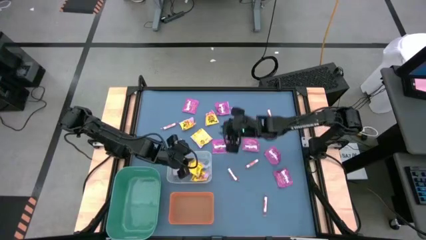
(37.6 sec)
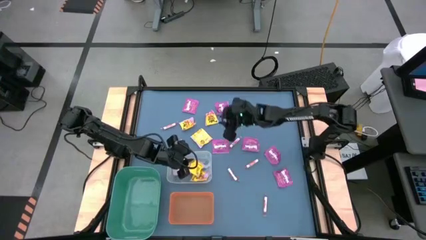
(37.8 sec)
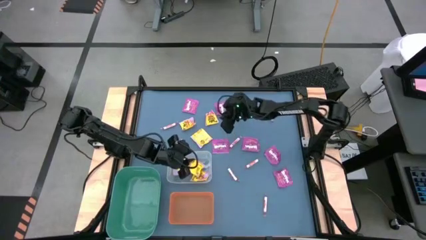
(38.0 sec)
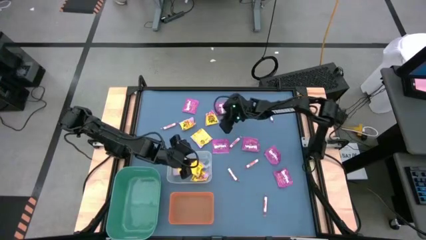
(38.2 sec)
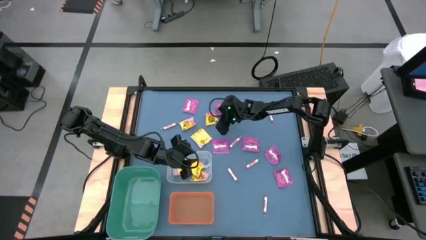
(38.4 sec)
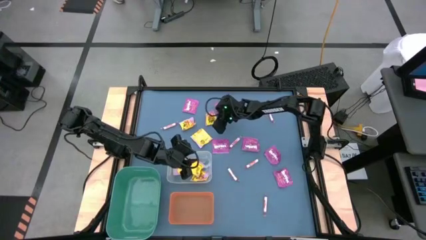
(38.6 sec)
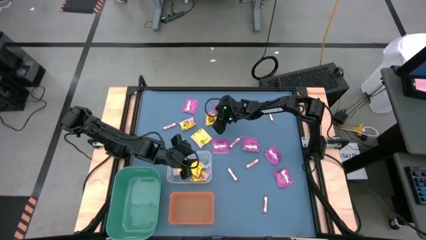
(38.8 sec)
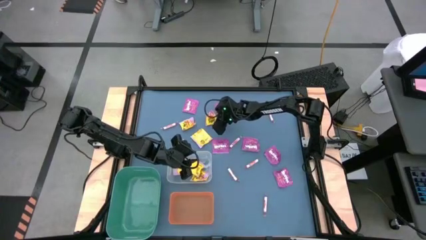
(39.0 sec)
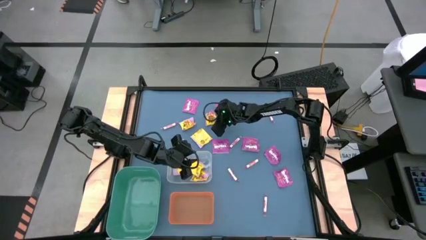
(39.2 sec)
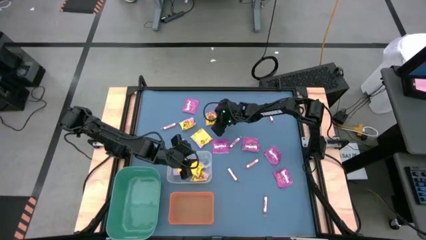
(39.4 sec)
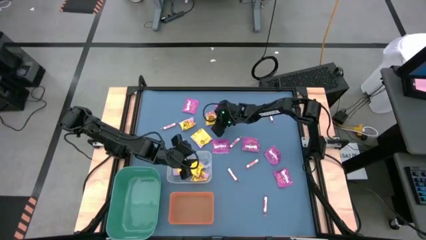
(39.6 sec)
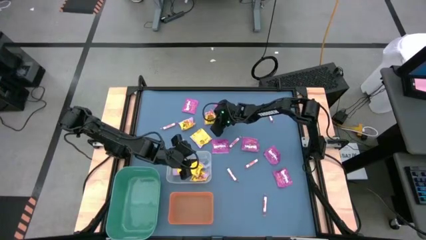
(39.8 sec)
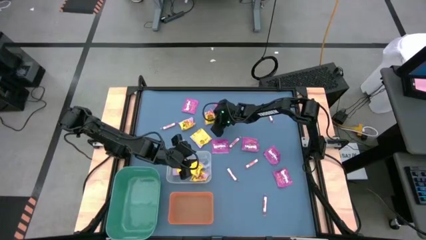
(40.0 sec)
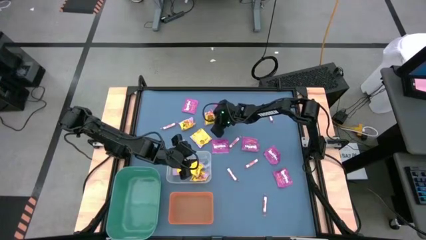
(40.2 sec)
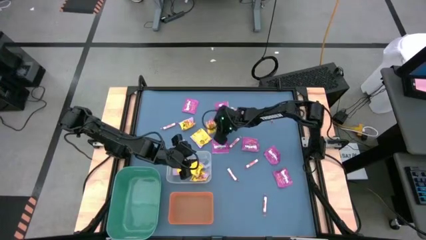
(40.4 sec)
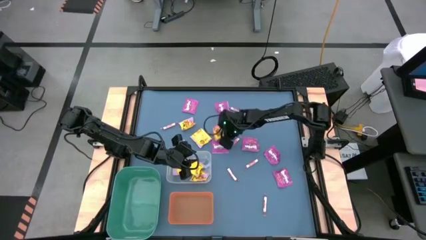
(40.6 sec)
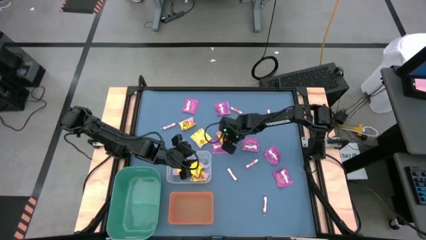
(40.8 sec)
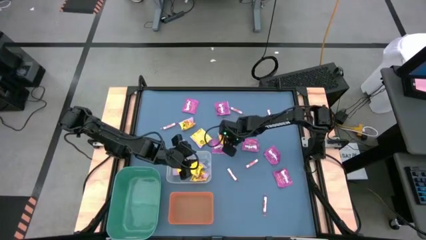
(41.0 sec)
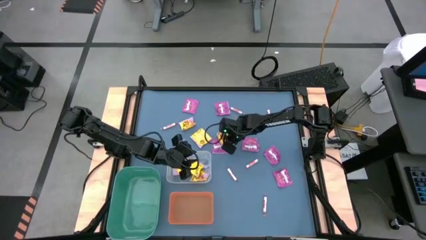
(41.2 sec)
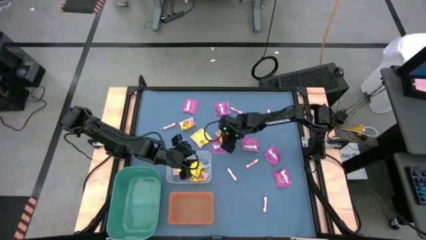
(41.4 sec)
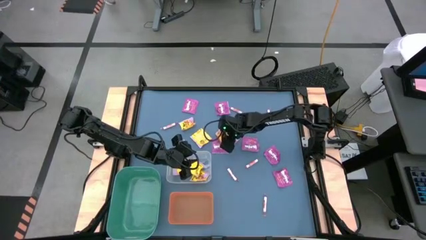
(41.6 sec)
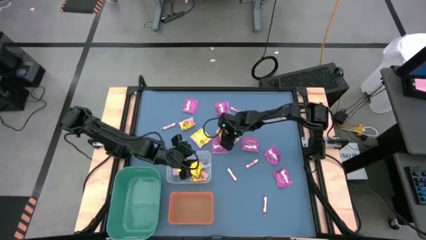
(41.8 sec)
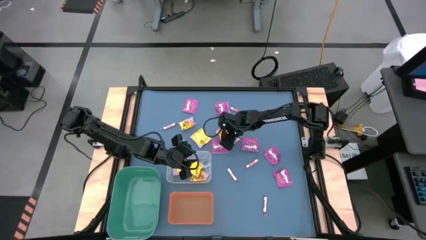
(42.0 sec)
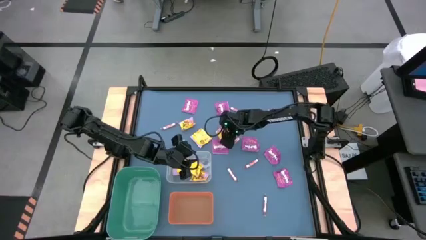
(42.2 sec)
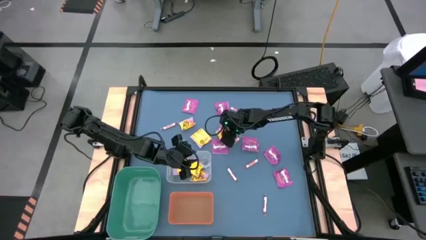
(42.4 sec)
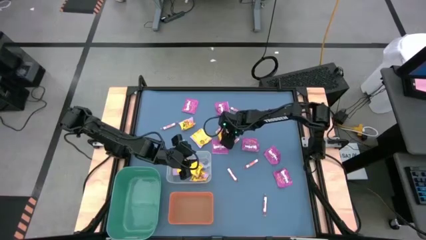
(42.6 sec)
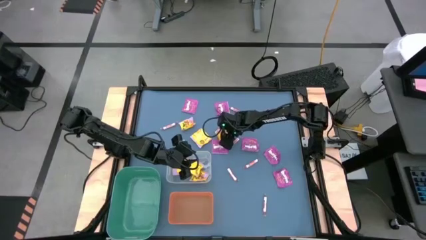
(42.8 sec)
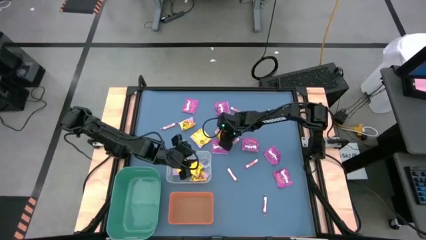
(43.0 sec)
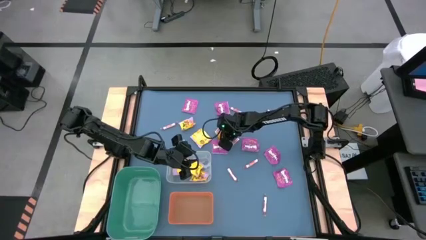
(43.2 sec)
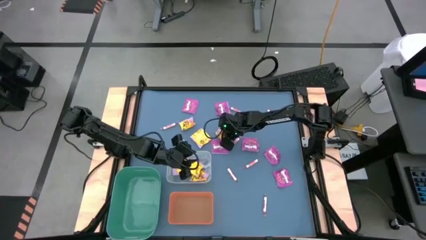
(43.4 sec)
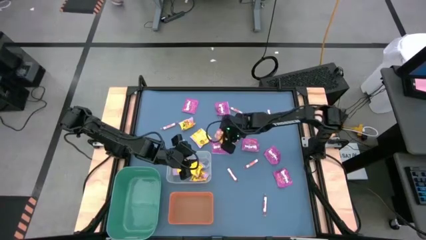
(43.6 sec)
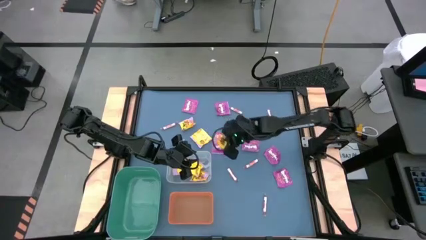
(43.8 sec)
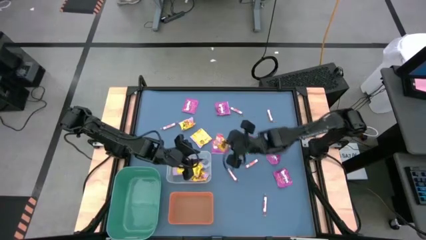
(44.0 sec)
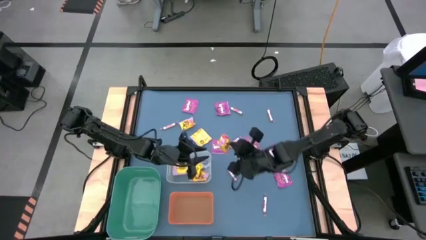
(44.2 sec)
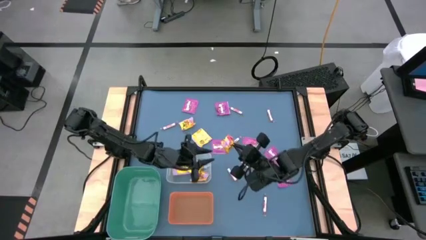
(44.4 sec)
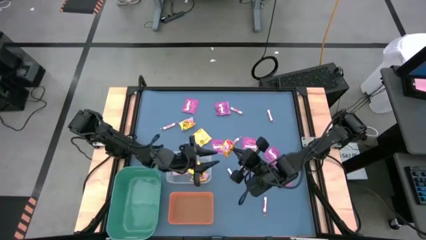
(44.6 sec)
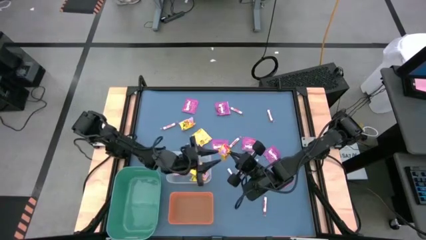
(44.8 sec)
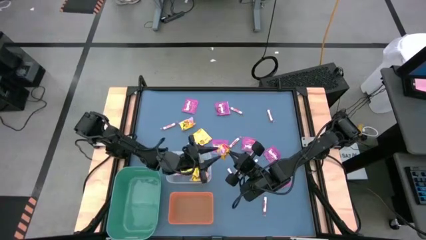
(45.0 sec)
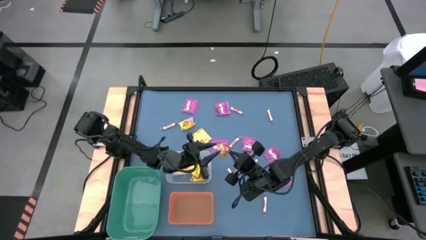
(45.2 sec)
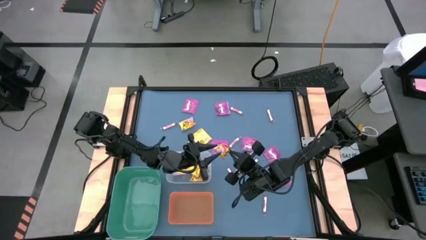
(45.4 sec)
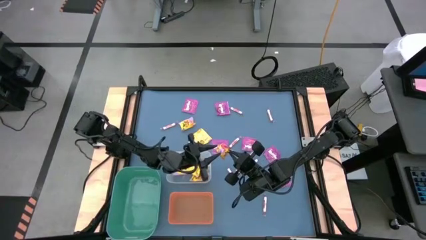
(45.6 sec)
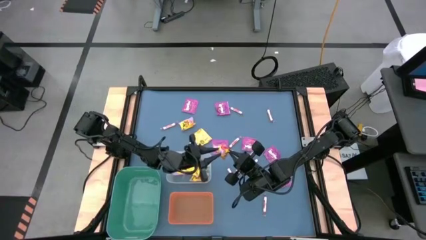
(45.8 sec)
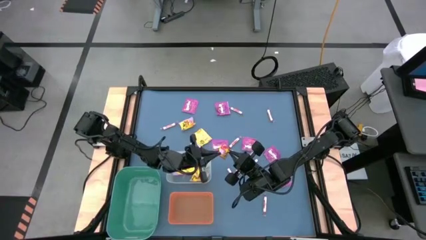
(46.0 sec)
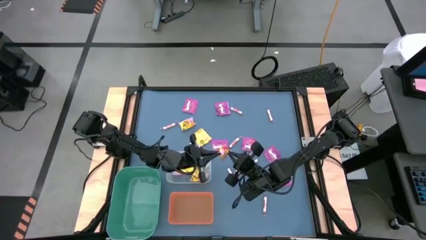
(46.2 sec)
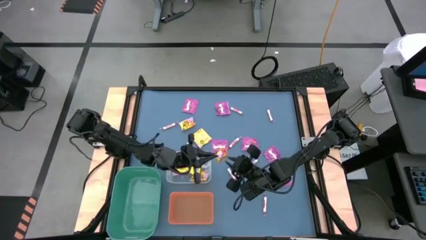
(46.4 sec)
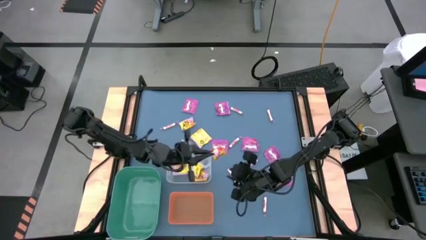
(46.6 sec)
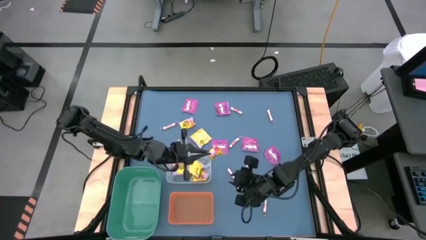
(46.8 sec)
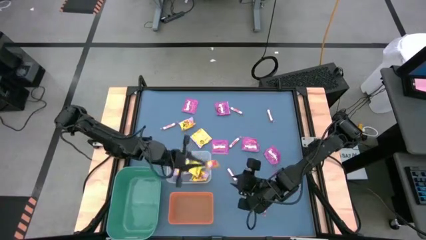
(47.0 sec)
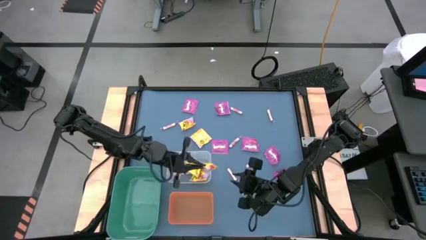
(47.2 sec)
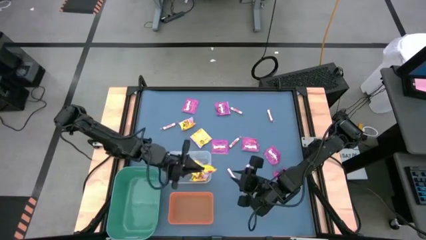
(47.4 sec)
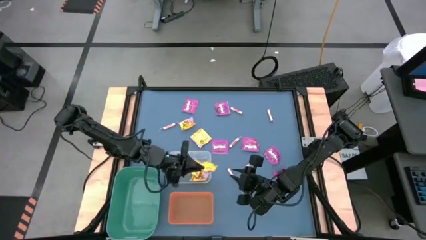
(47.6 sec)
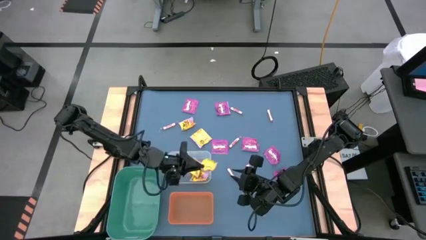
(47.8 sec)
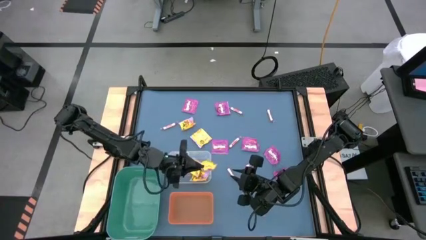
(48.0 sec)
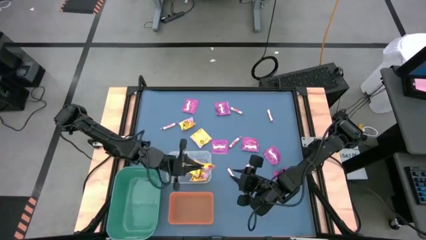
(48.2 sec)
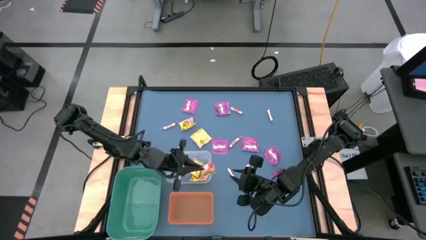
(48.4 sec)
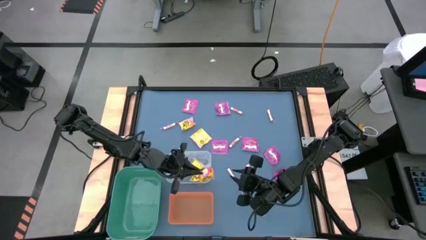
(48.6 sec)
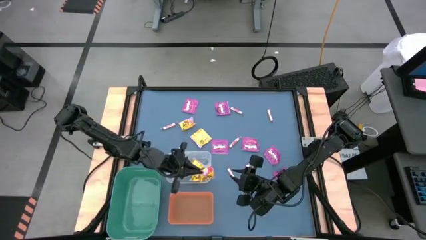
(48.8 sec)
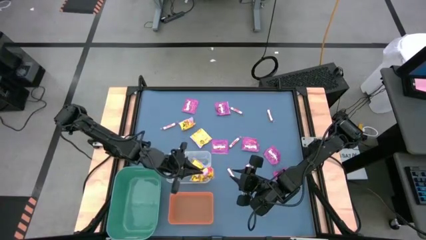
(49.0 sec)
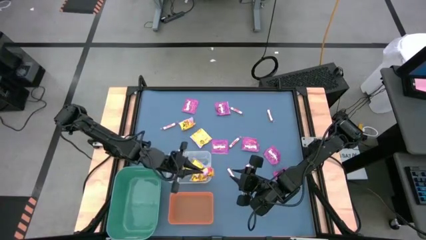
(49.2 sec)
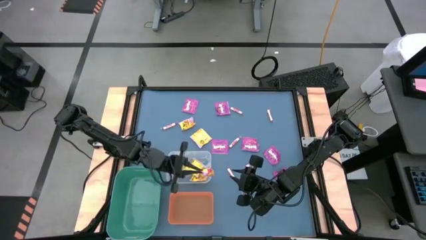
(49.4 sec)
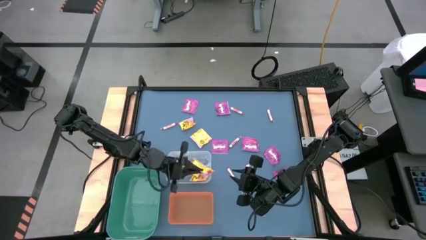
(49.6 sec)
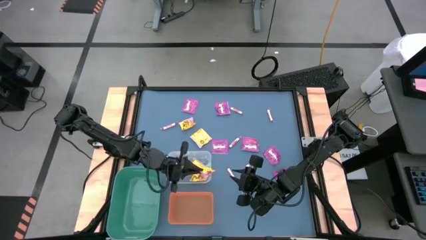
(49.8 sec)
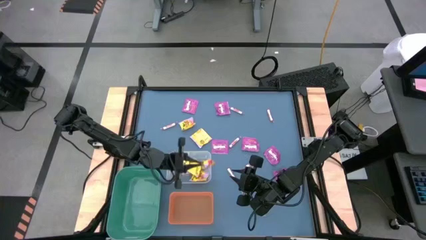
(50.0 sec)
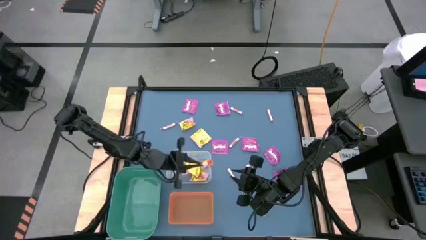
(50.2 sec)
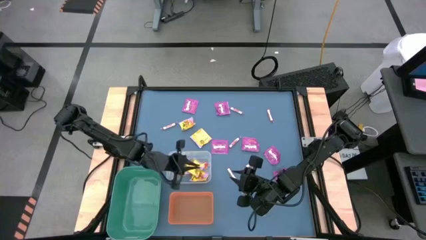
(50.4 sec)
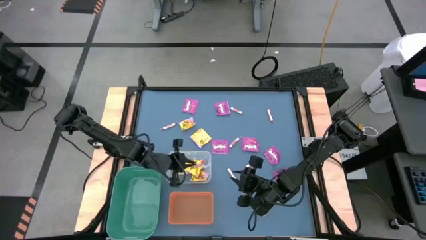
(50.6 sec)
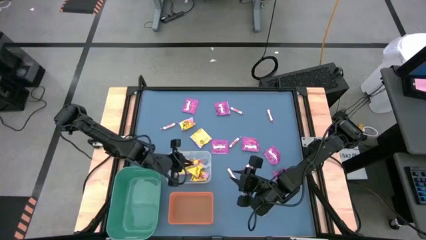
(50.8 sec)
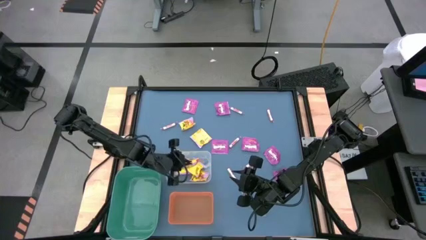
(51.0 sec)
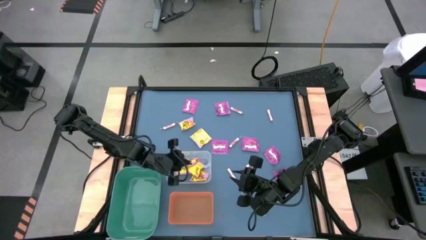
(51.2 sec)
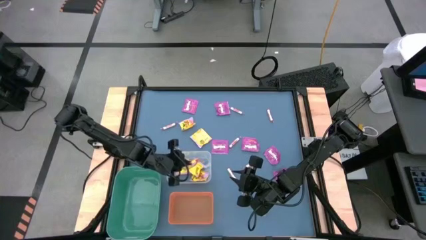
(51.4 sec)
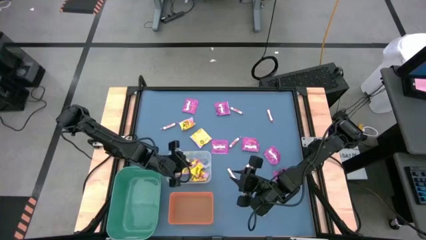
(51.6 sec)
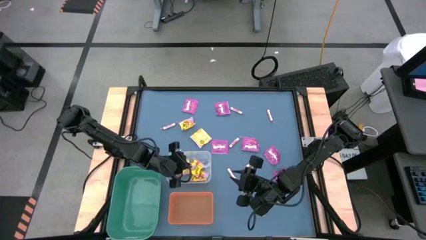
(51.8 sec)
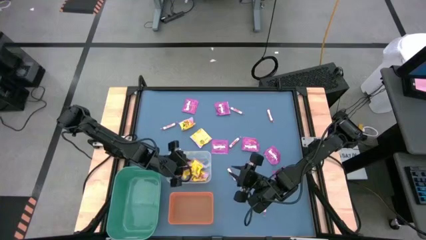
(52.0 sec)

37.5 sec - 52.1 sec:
Task: Sort candy
Put the yellow candy into the transparent bin
